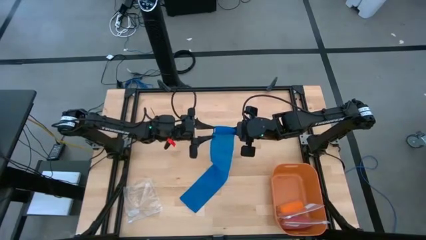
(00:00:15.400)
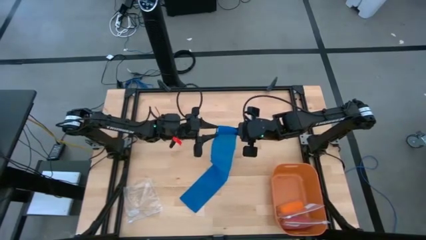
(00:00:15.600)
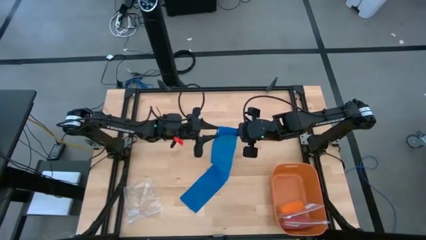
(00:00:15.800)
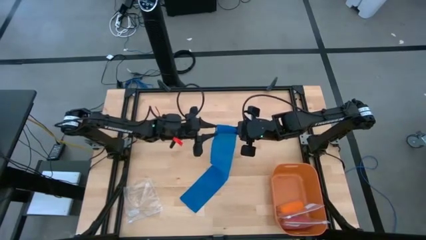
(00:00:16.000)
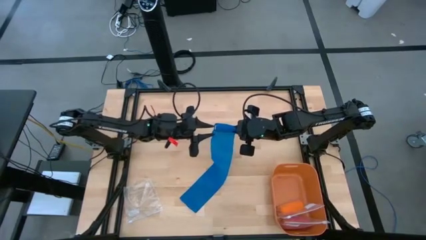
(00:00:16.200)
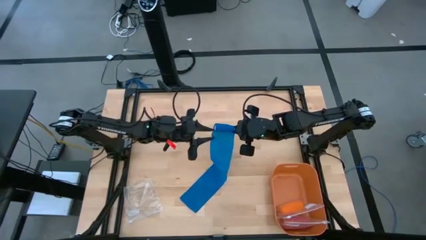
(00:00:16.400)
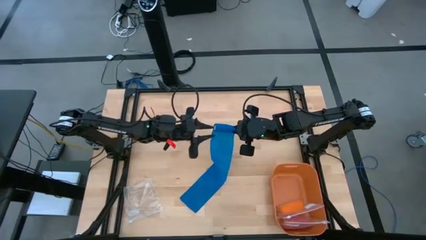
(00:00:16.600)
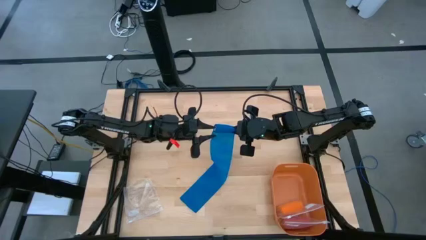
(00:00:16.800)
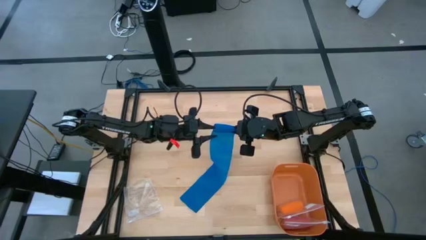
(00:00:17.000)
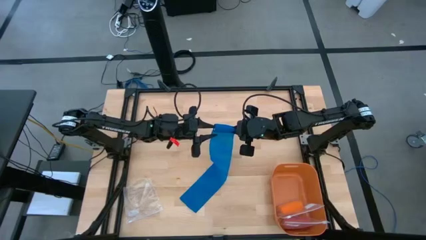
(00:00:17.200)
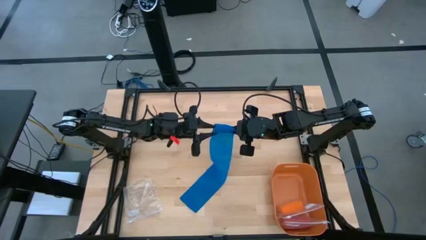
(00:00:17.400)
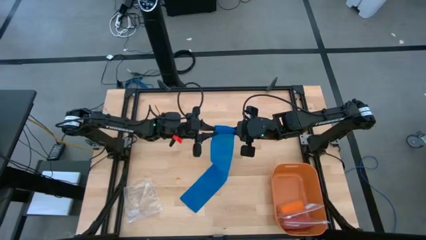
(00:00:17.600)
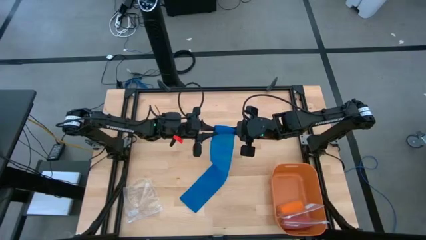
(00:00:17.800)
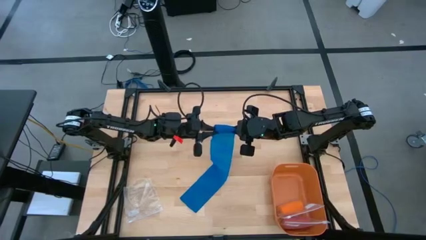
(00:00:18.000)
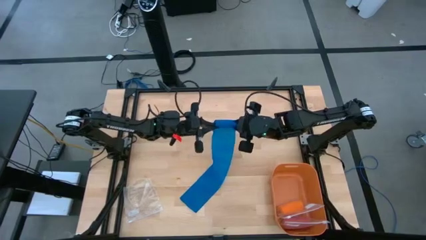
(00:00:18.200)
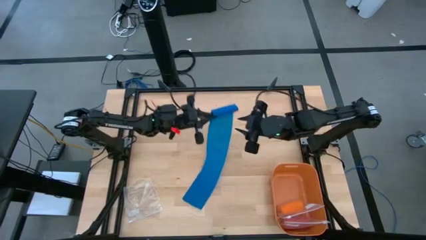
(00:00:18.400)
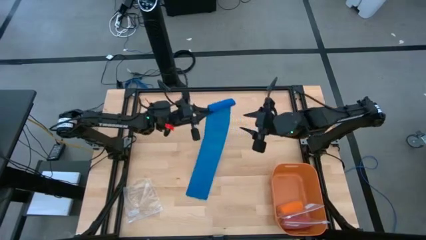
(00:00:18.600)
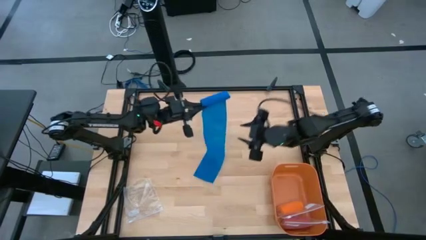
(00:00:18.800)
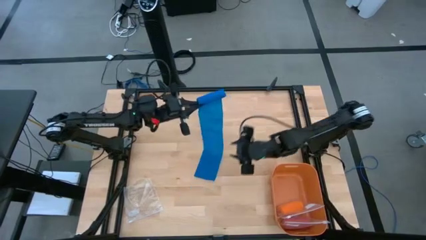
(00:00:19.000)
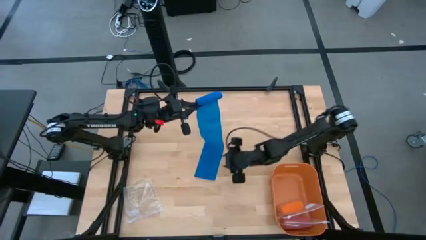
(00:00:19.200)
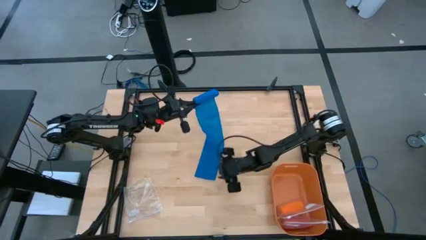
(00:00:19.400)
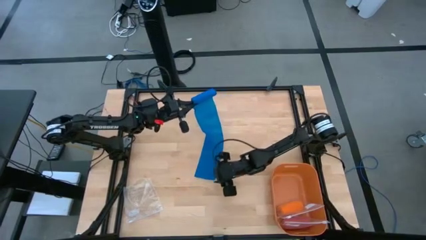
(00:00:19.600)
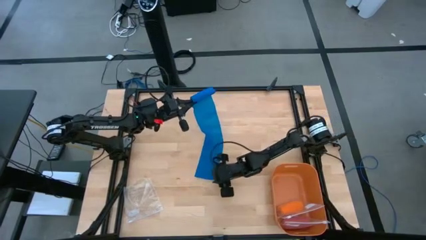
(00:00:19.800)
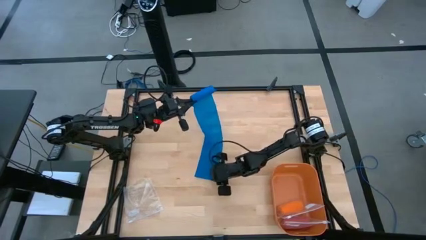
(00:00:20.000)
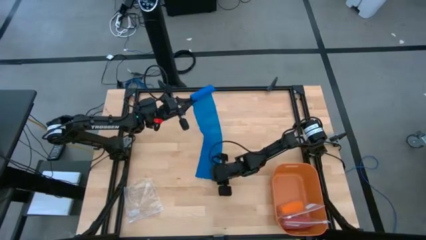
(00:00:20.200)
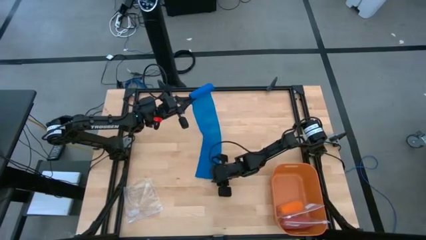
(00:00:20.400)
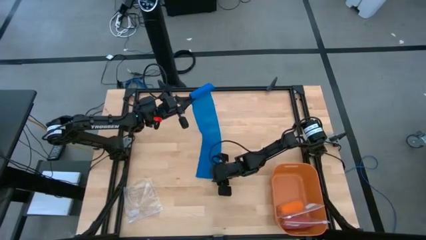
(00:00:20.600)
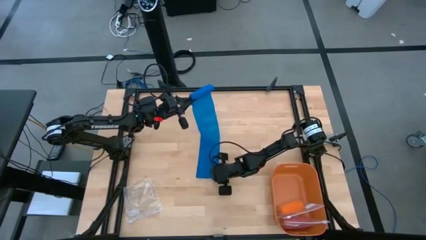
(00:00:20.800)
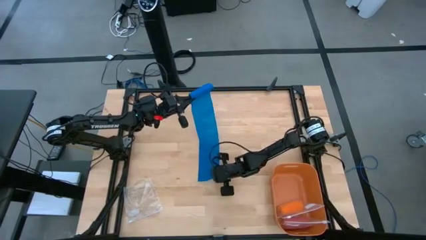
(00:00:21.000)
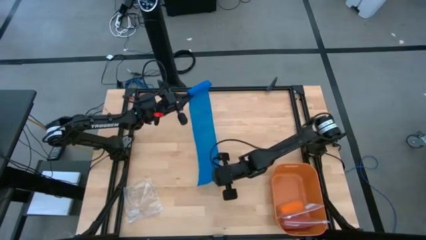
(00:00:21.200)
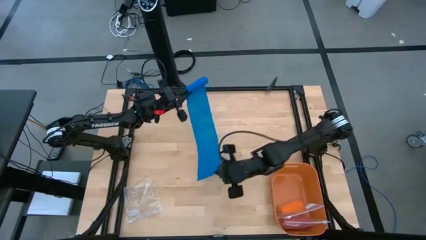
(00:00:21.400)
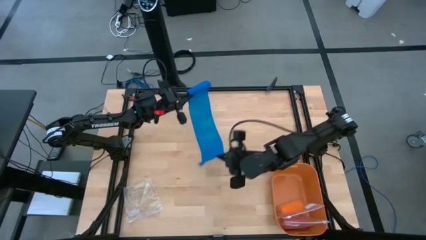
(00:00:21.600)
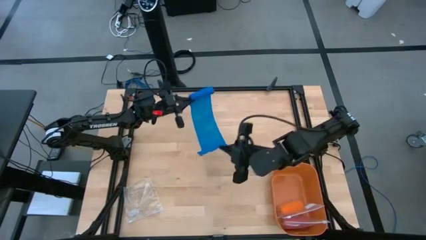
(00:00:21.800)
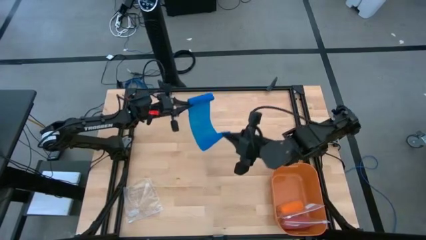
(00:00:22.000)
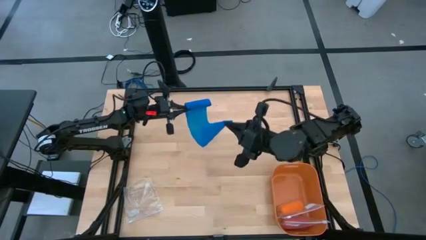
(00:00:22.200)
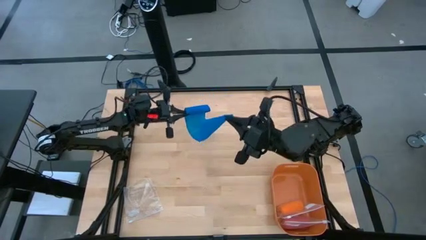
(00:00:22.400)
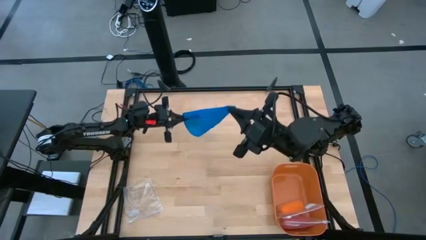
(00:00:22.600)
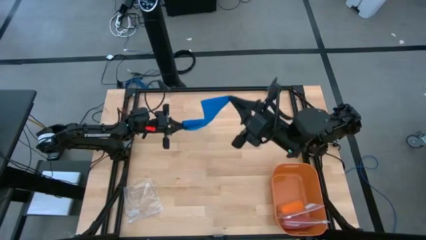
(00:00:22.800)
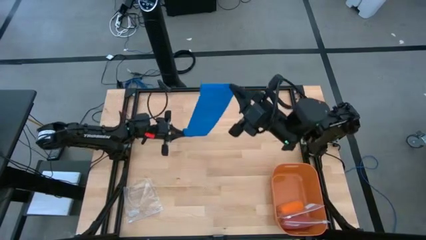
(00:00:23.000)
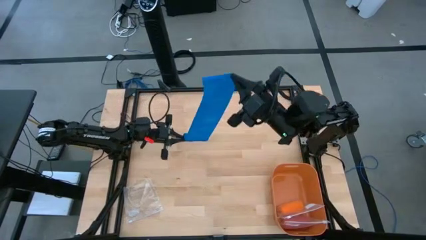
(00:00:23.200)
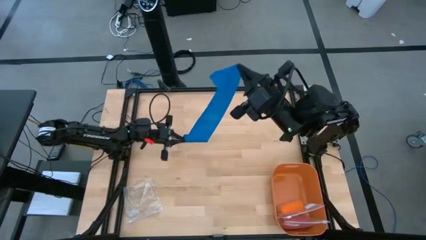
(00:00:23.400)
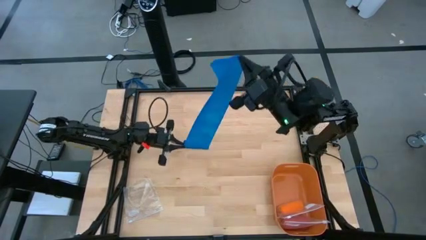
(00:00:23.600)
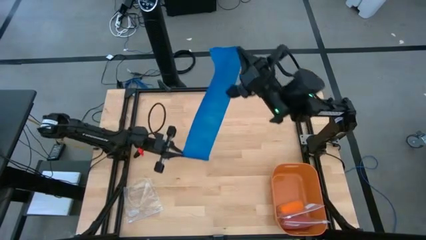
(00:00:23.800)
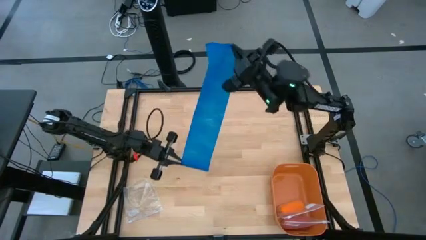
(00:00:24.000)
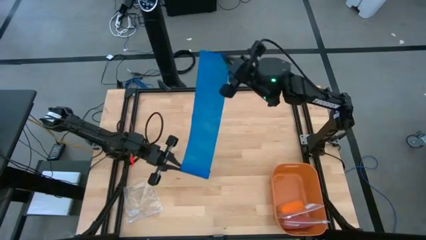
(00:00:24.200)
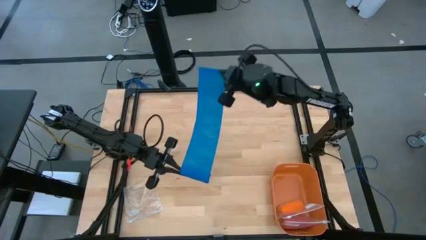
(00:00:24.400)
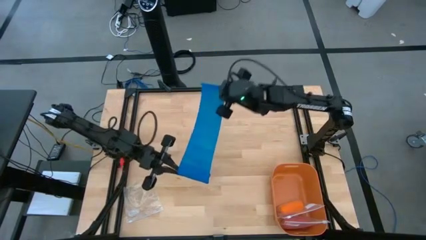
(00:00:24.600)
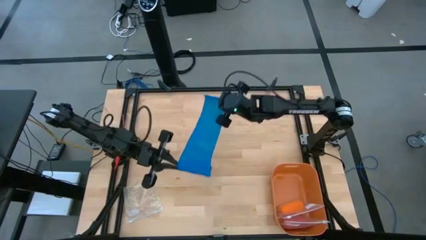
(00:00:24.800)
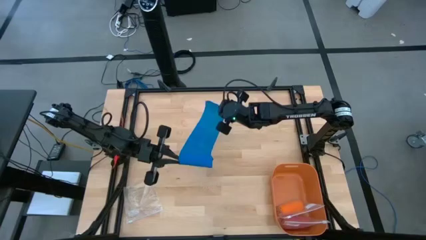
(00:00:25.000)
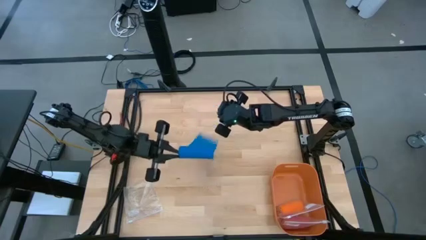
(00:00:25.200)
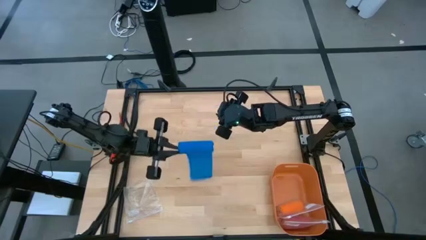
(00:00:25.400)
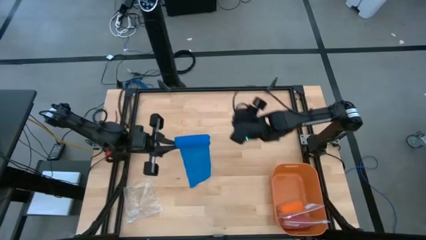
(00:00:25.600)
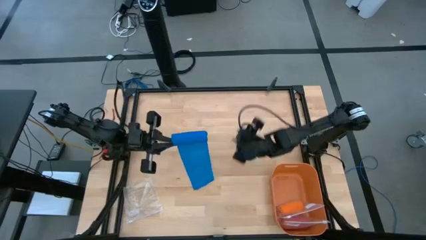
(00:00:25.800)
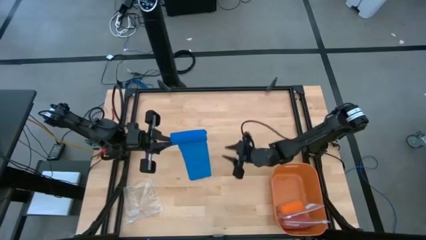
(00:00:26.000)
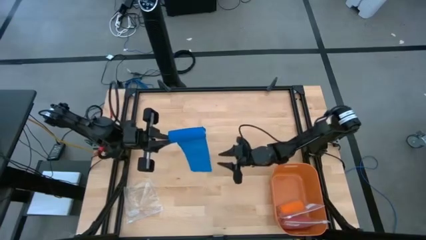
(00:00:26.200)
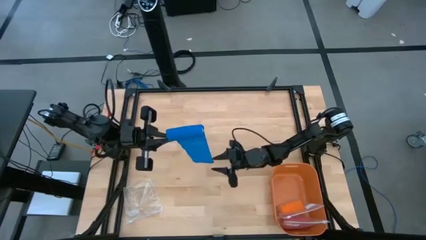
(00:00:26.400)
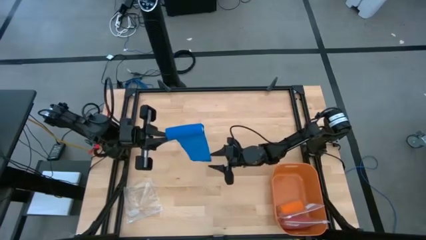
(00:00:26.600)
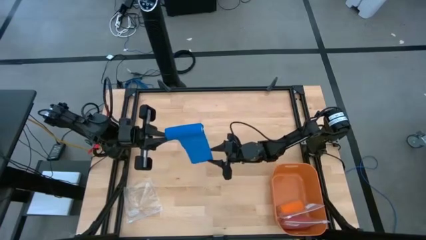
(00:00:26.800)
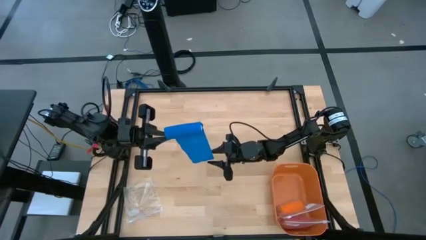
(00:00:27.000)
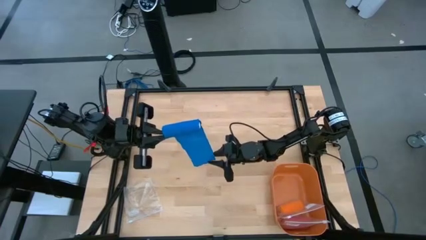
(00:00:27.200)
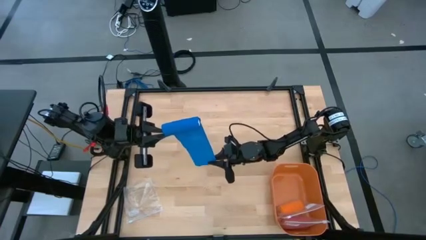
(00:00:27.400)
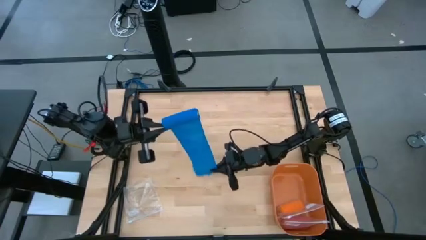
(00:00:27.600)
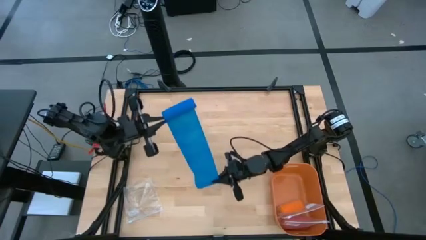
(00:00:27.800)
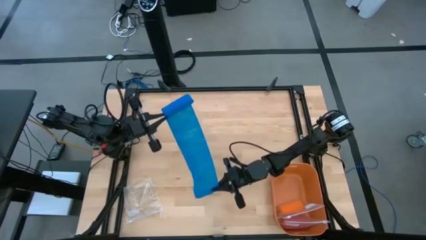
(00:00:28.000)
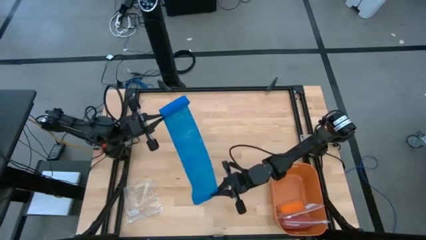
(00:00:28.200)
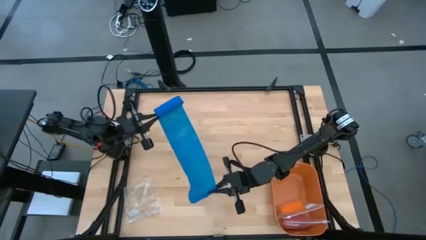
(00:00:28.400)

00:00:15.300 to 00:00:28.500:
Task: Roll bandage
Roll the blue bandage
